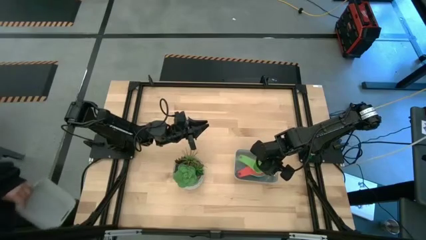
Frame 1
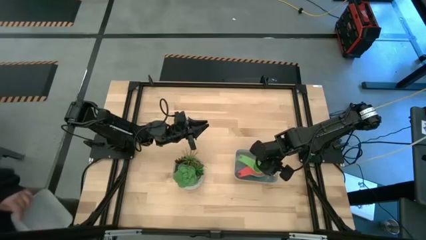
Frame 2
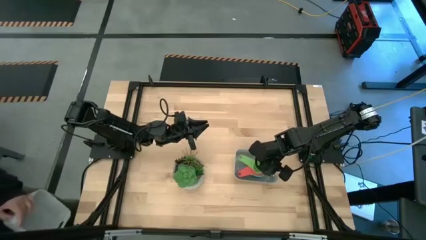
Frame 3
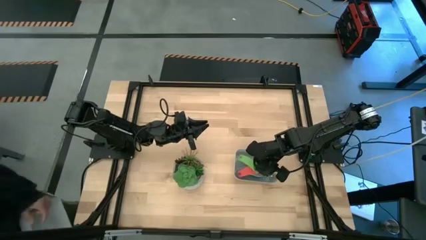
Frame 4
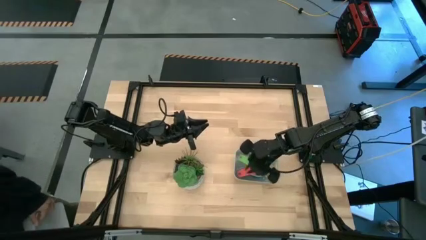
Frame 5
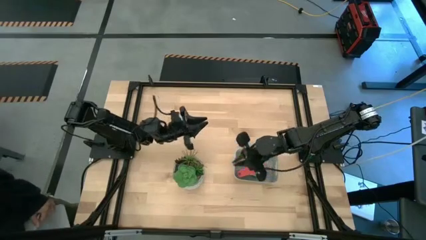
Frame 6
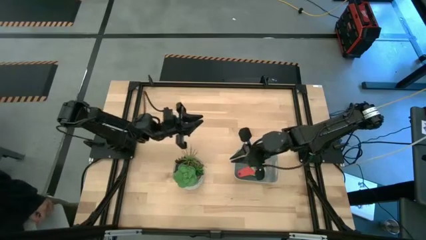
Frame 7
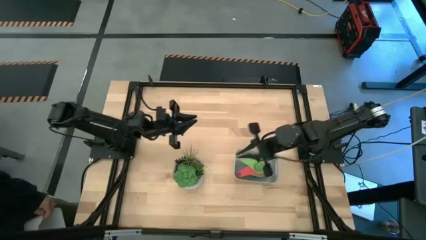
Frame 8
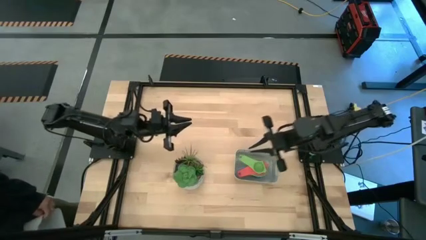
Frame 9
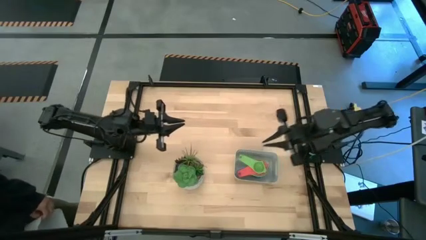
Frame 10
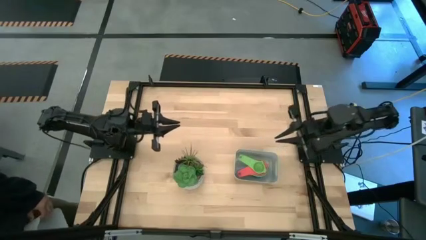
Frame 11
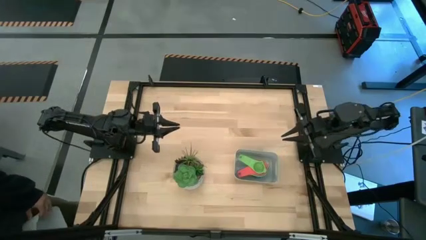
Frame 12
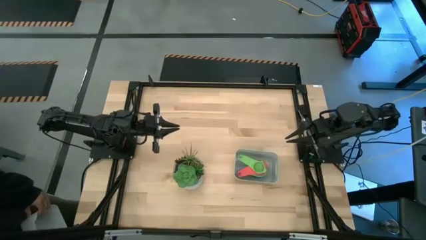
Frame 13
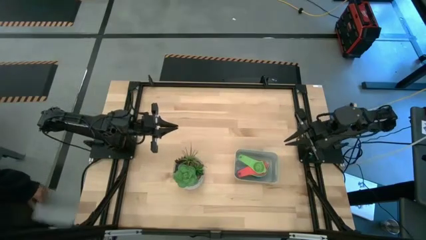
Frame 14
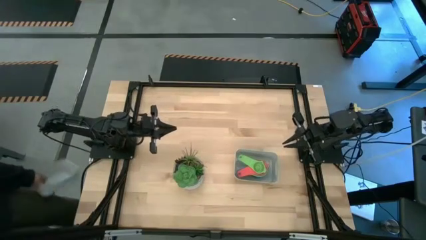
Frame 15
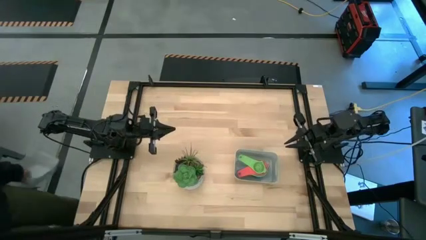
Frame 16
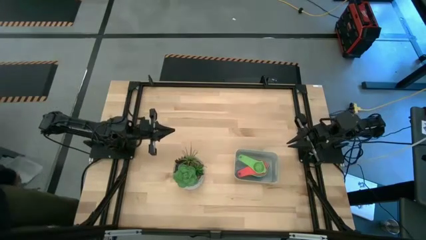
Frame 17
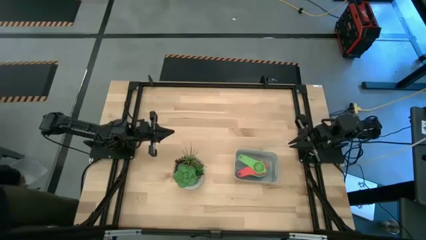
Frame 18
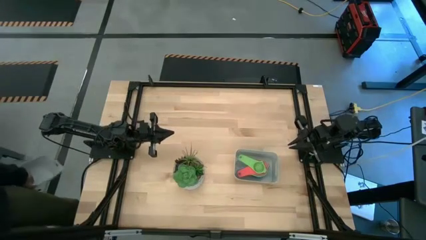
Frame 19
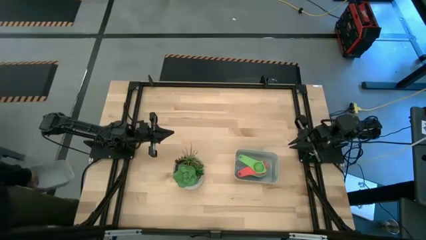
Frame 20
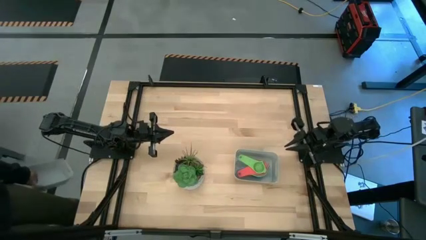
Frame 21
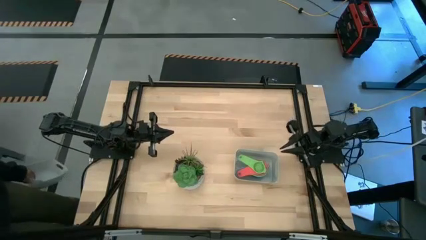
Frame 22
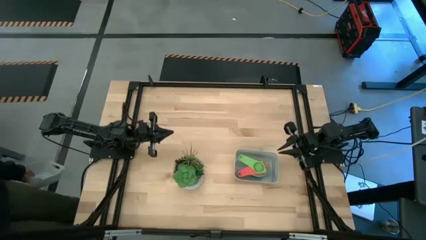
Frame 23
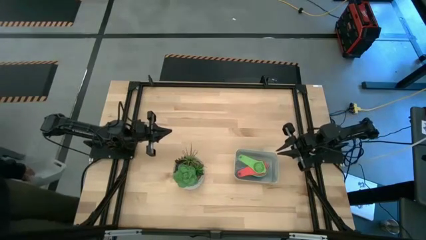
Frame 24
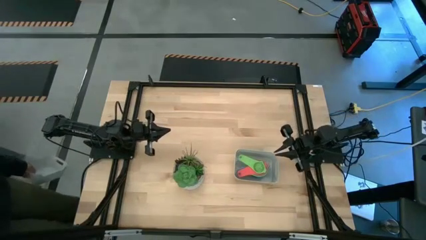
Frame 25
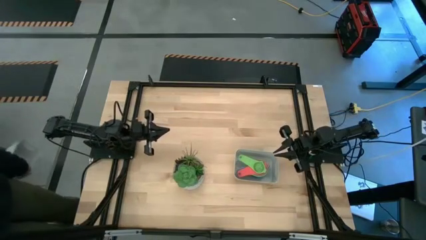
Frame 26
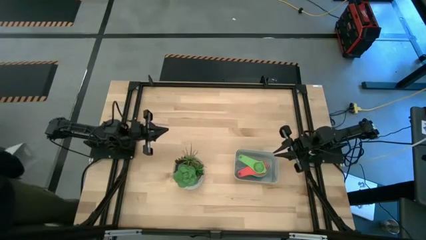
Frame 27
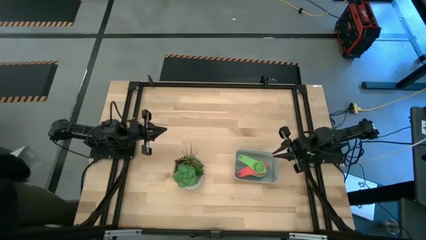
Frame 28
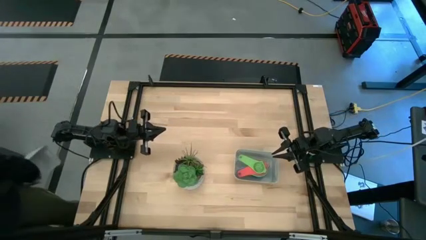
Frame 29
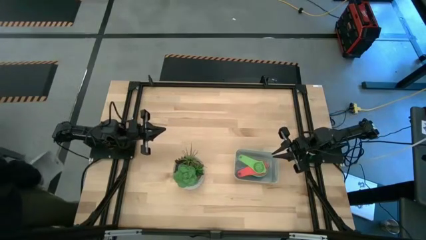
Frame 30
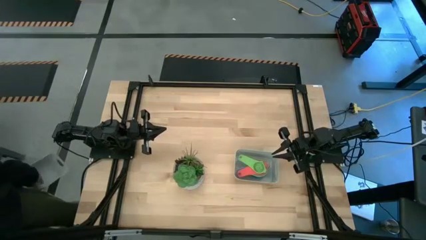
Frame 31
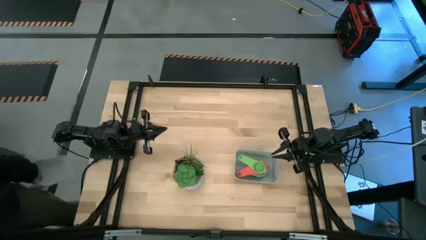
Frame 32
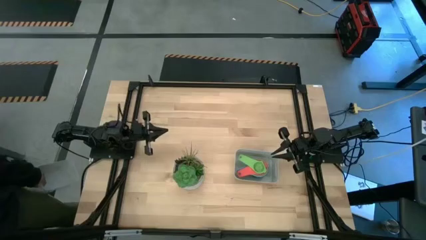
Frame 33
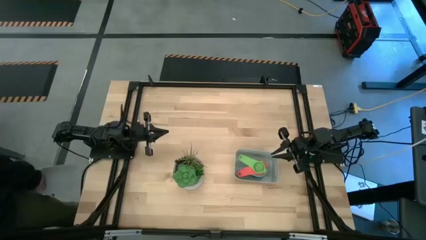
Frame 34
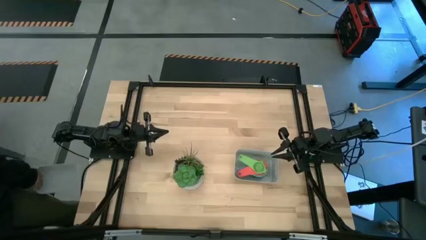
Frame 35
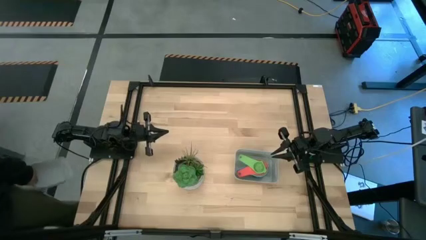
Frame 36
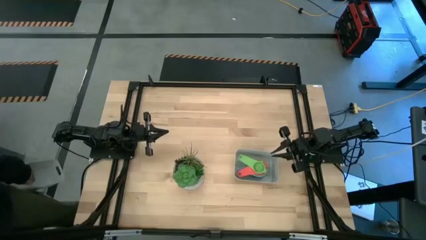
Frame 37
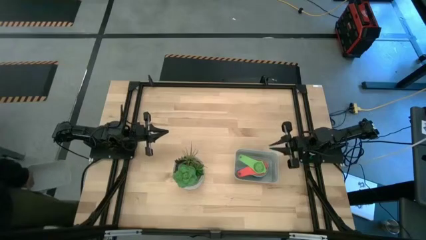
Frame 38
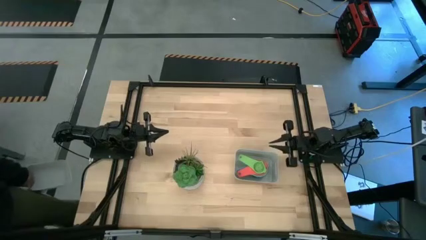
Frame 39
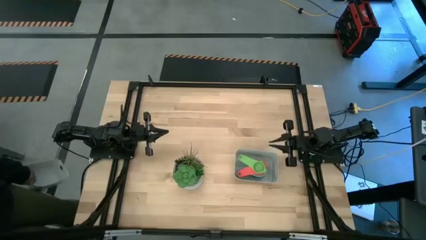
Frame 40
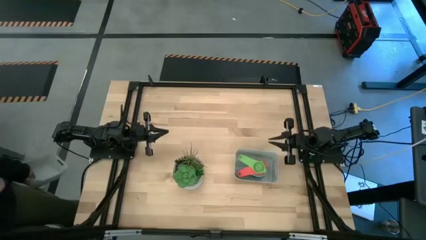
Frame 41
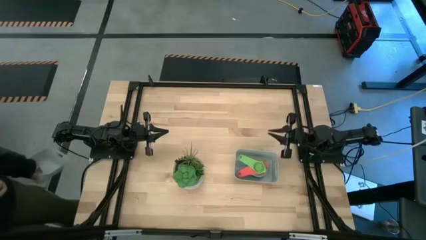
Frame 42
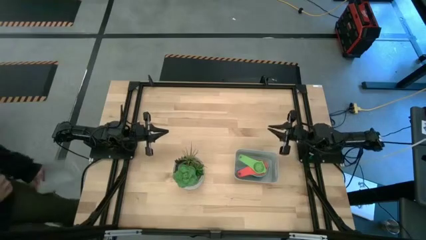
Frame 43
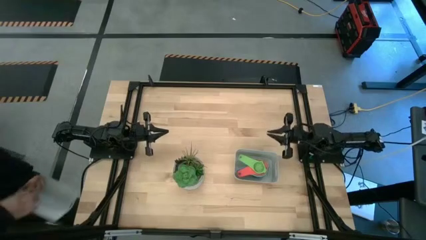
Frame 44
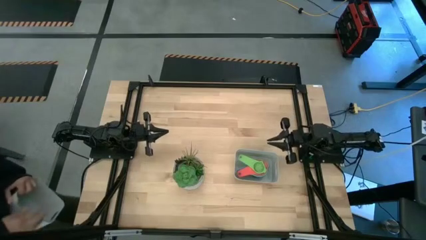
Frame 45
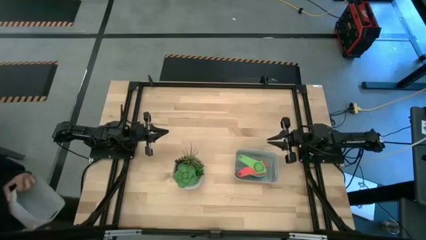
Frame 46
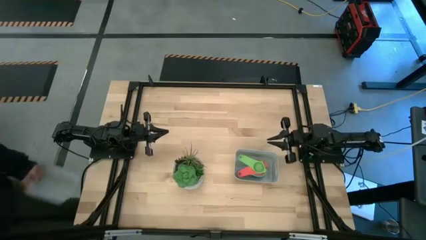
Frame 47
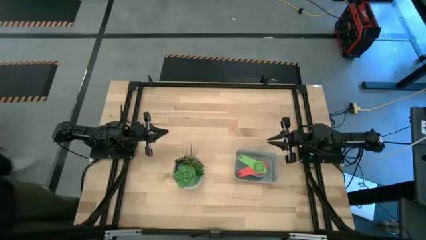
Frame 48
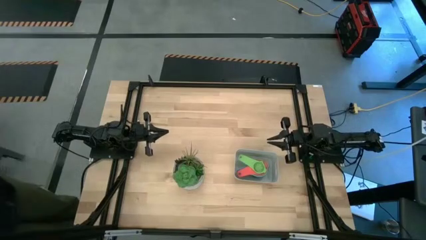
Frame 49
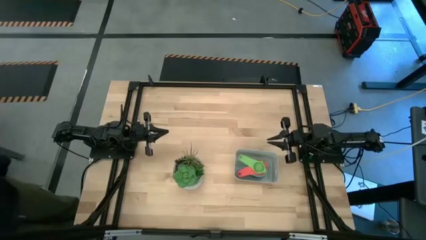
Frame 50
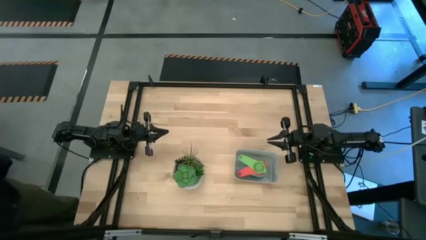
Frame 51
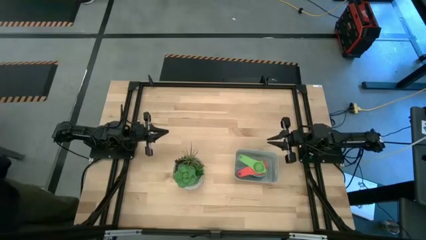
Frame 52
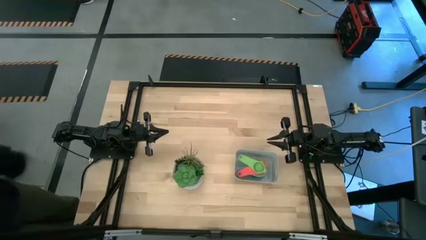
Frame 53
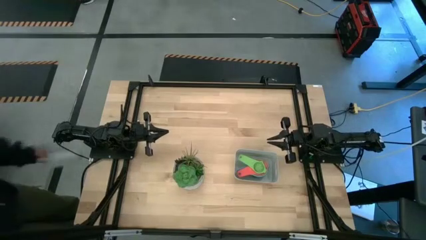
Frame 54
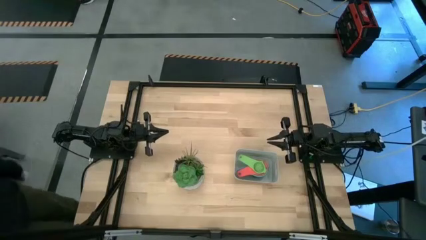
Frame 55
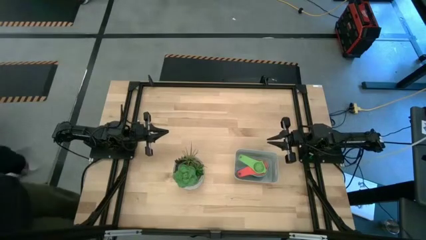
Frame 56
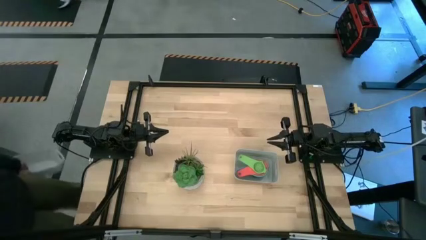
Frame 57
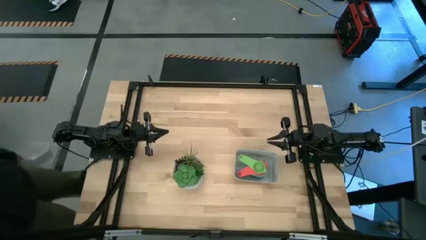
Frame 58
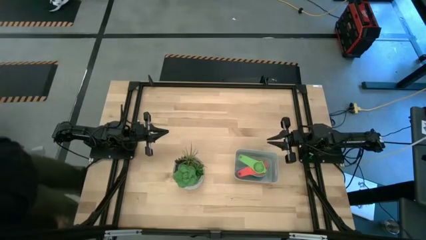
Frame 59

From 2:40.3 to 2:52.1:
Task: Nest measuring cups in basket
Return to Home Position
